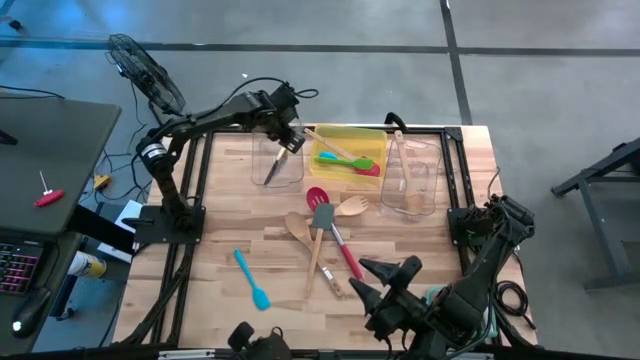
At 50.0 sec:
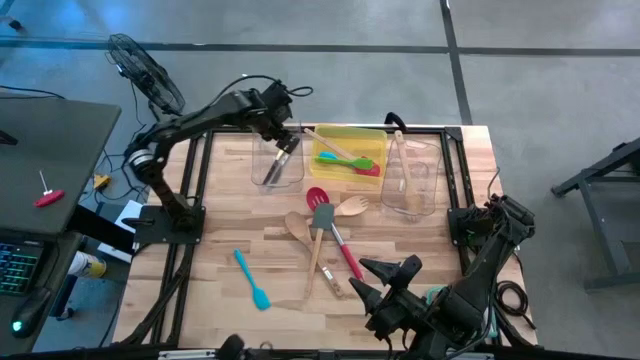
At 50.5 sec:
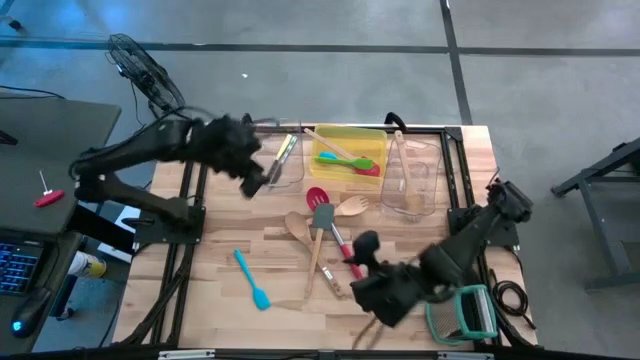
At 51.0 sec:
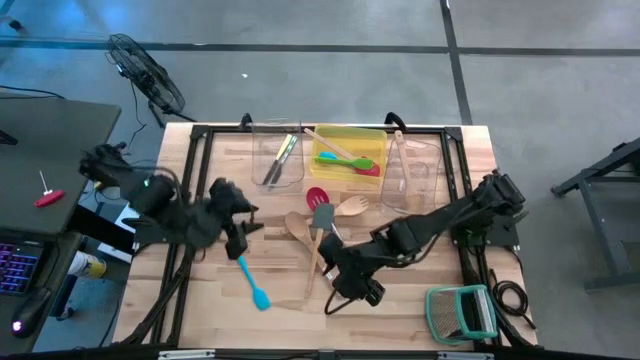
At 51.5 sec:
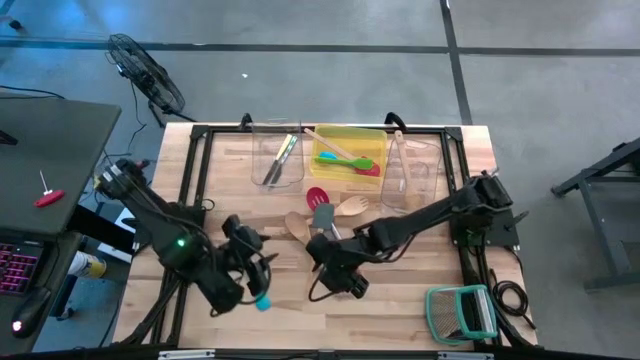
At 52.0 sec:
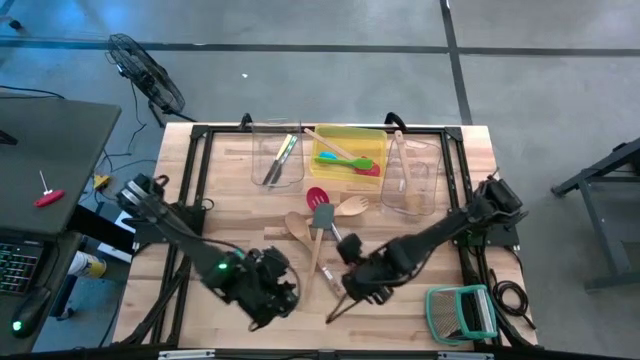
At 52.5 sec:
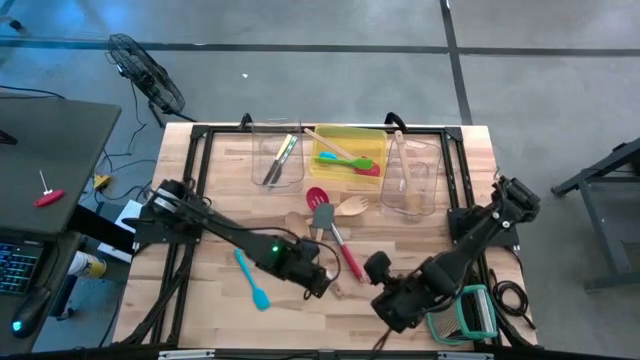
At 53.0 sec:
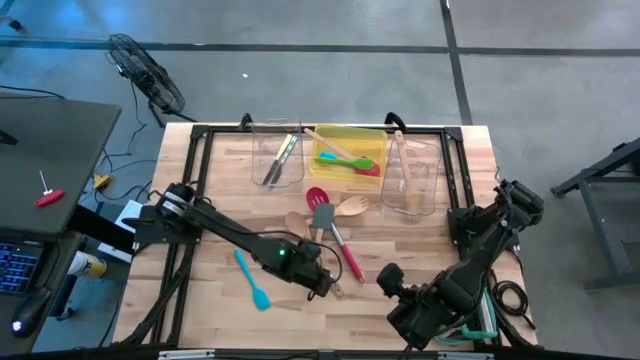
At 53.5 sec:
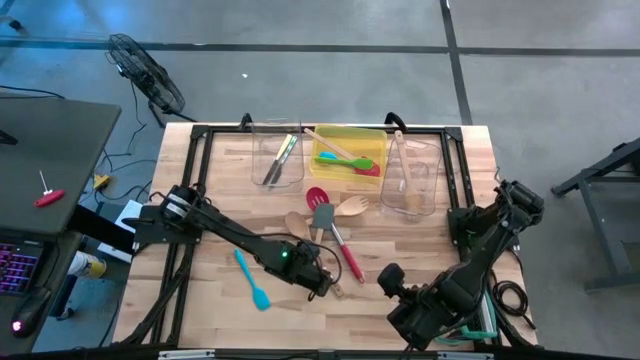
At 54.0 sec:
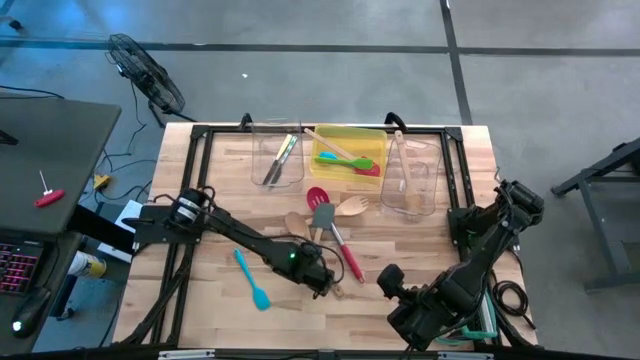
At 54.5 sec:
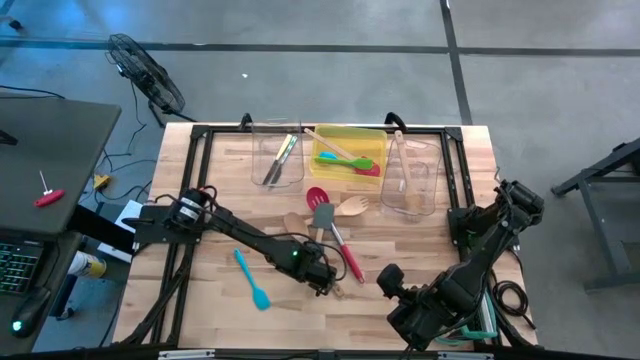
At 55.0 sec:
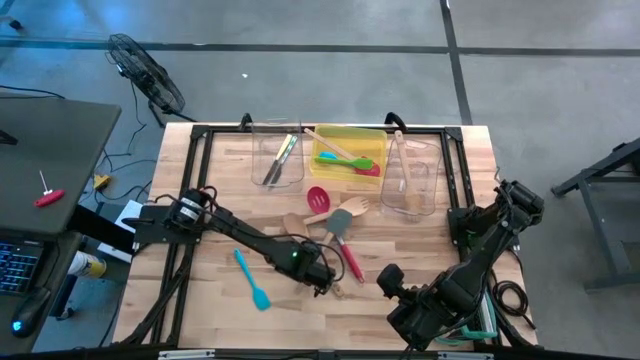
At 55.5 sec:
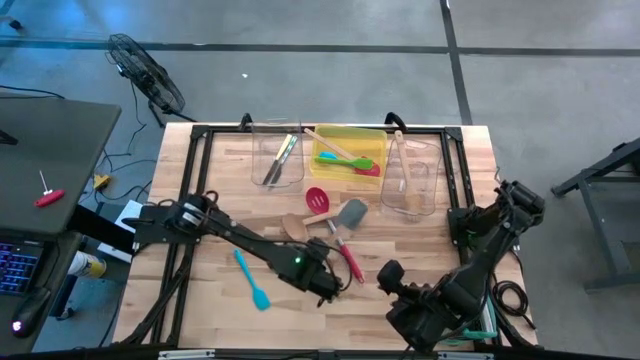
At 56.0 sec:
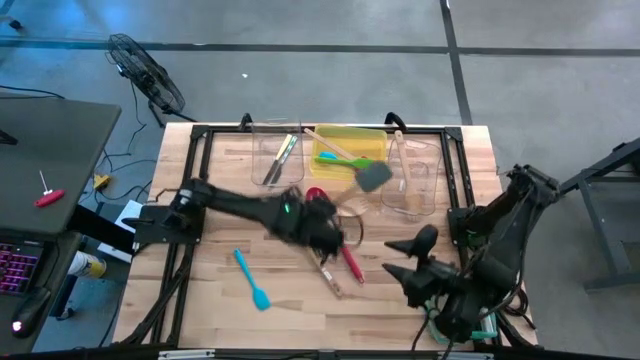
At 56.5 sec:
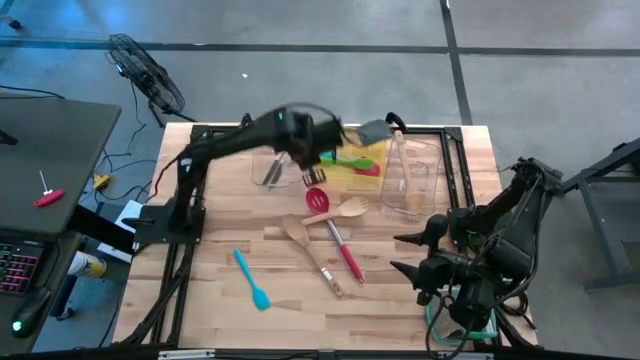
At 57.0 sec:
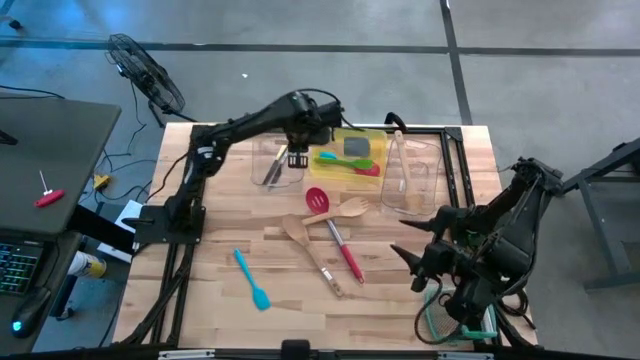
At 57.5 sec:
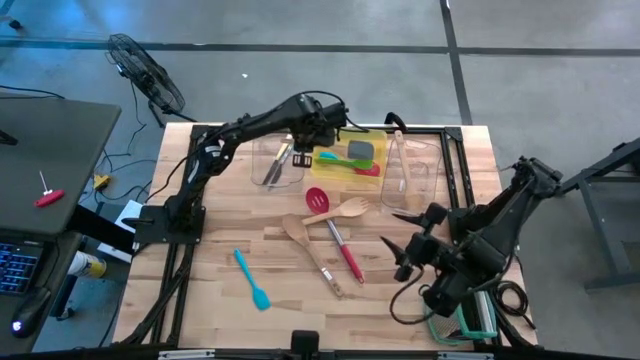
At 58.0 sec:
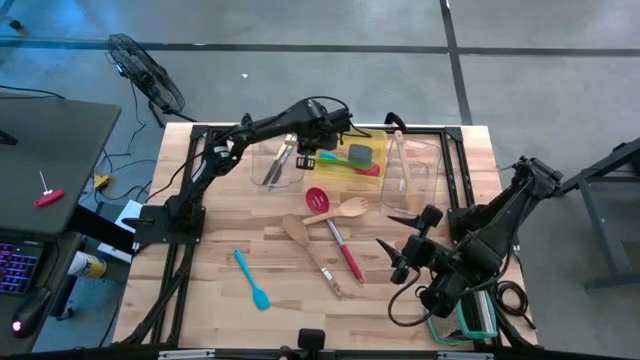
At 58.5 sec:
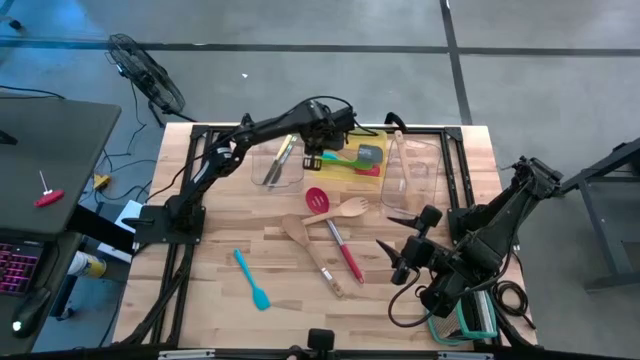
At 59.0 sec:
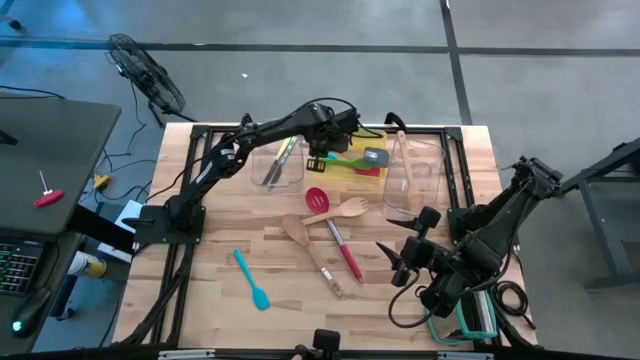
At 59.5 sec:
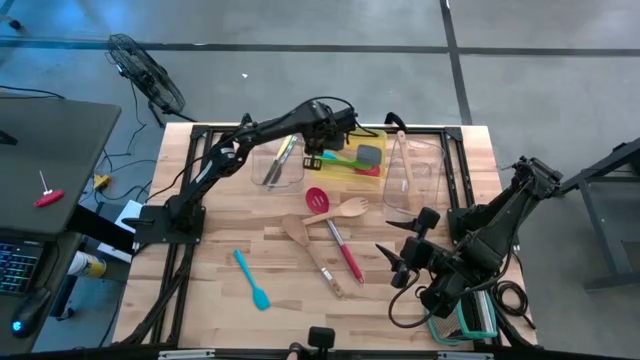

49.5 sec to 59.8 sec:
Task: Pick & Place Kitchen Items
Put the gray spatula into the yellow bin

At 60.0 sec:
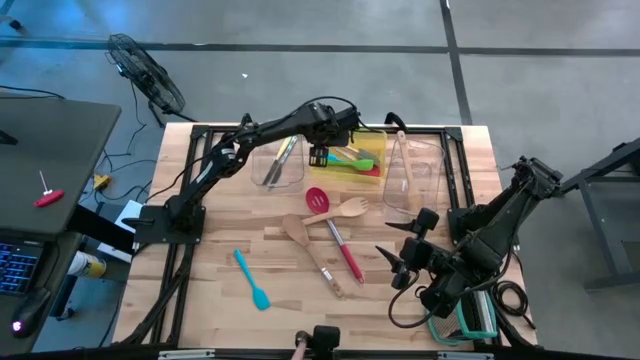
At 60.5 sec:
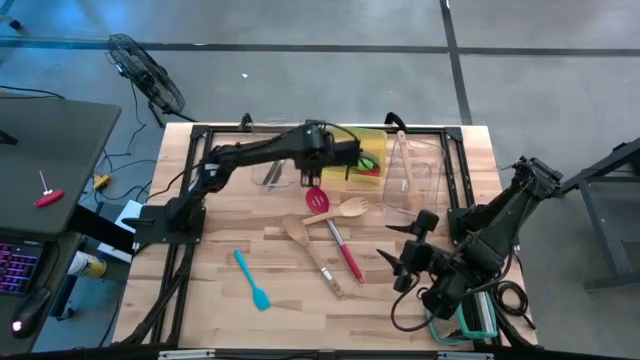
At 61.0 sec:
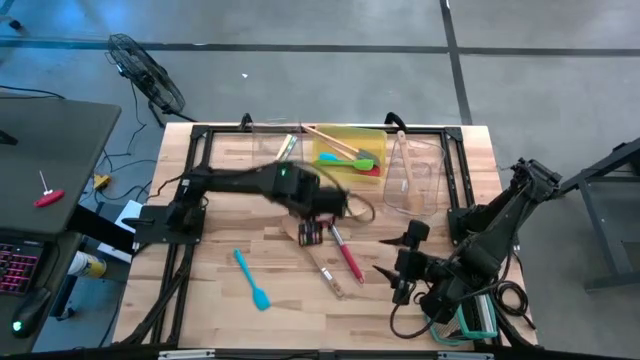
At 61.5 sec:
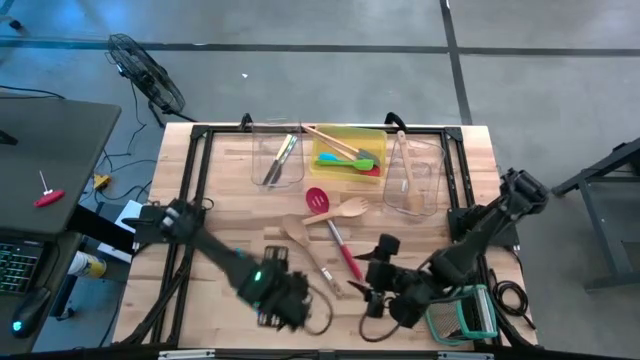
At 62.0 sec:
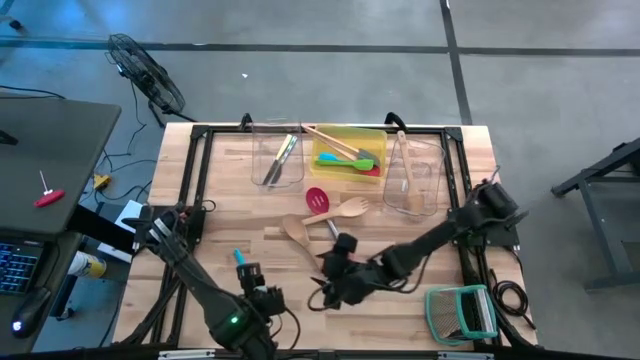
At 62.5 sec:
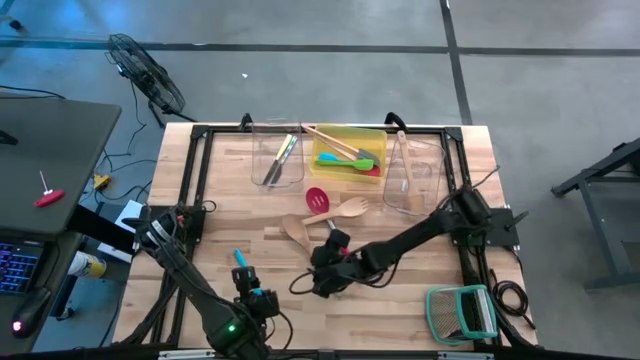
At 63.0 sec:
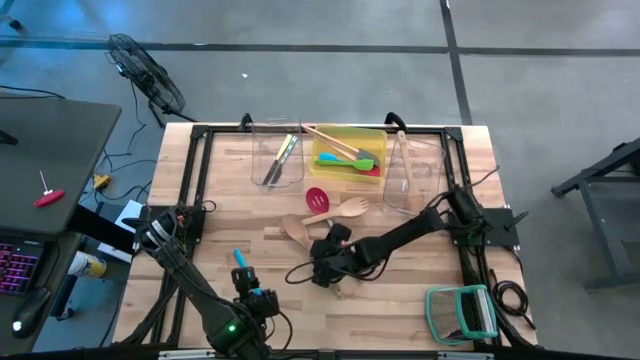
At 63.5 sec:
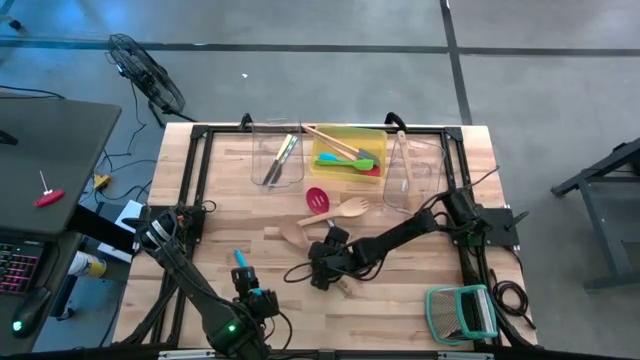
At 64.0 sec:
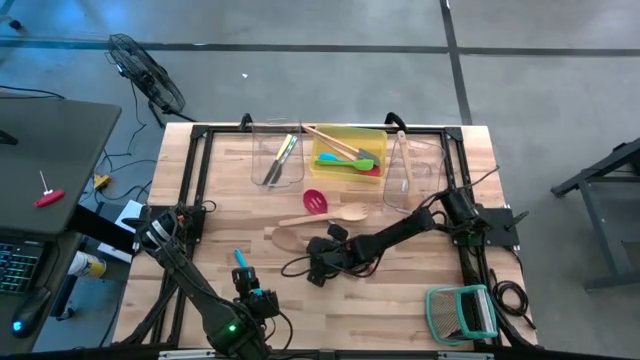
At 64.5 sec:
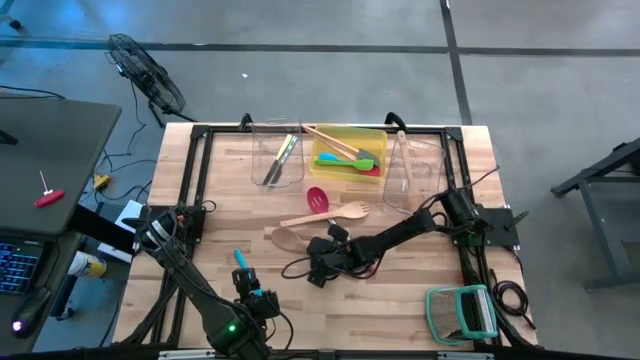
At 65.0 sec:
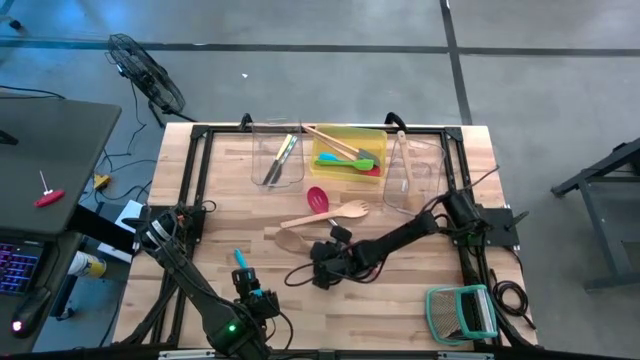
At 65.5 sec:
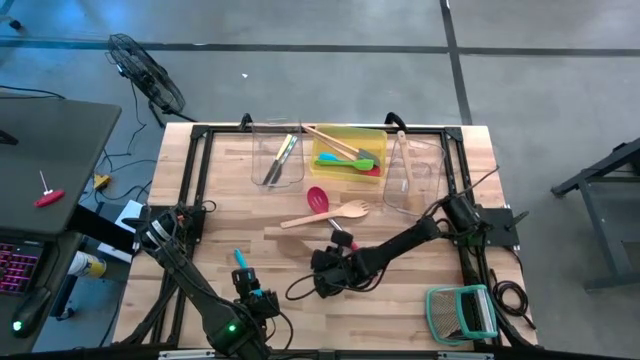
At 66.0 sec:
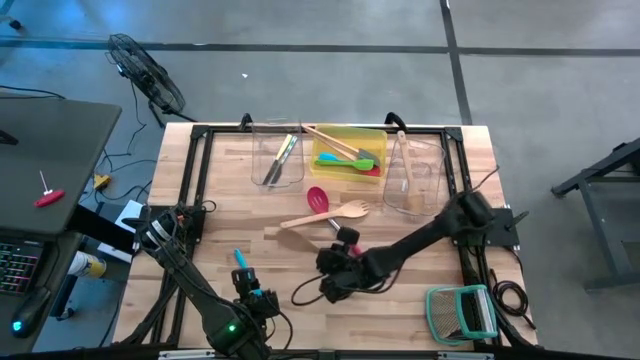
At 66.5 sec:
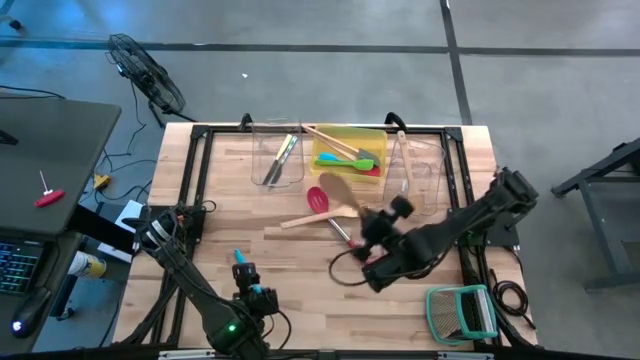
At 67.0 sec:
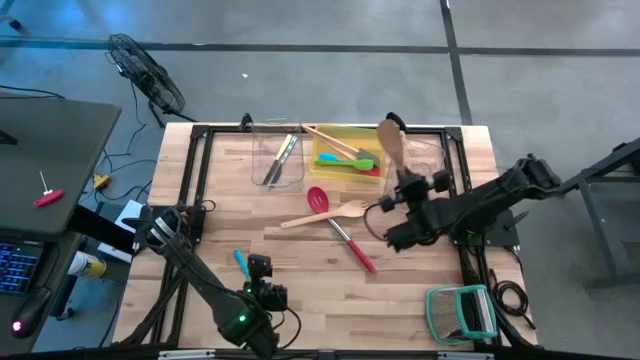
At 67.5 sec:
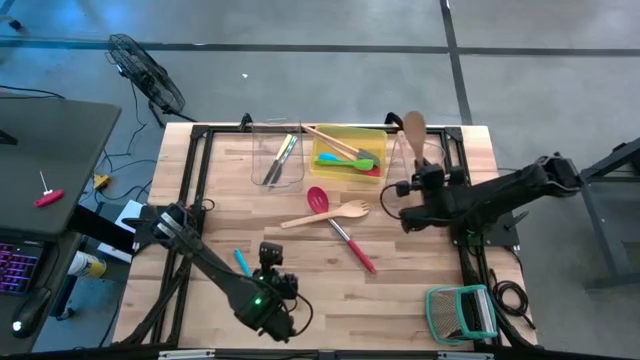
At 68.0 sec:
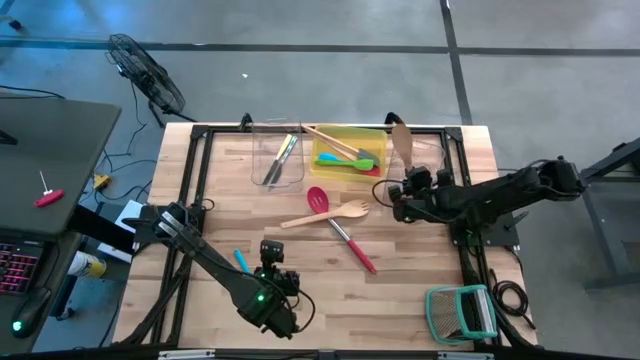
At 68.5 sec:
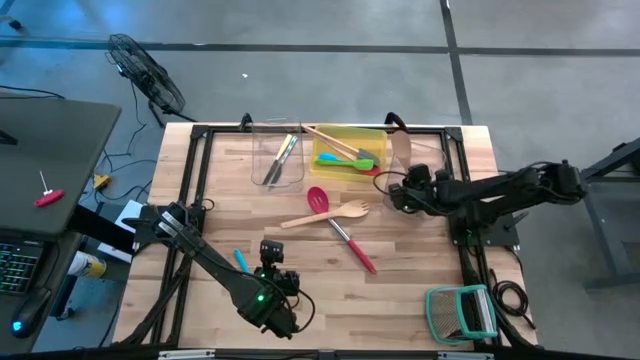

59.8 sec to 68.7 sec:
Put the brown serving spoon into the right transparent bin
